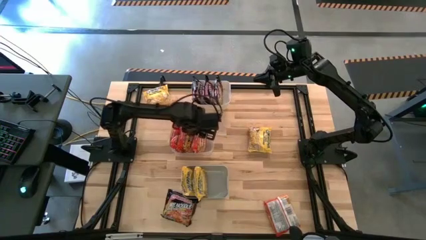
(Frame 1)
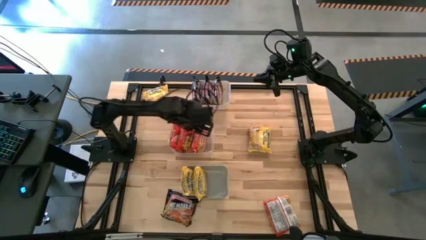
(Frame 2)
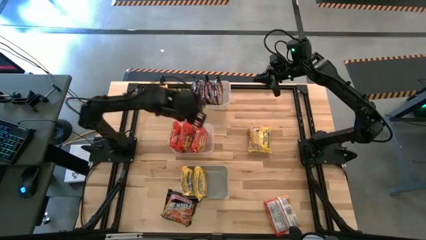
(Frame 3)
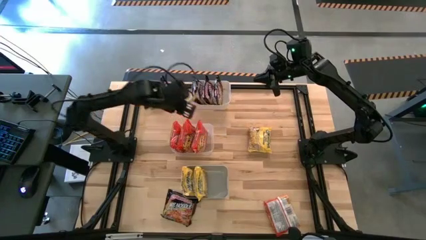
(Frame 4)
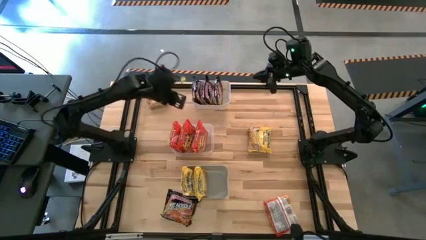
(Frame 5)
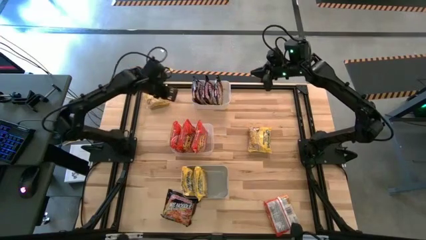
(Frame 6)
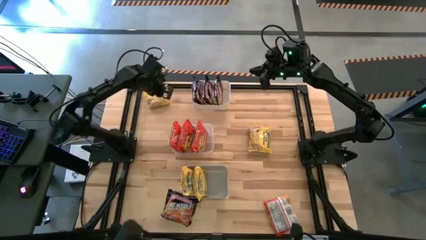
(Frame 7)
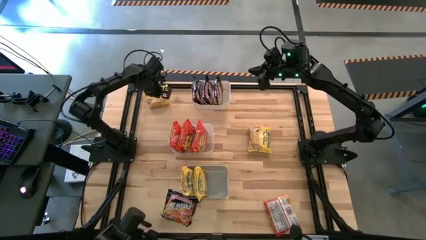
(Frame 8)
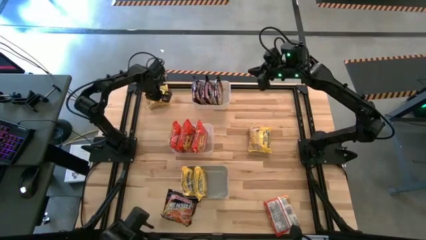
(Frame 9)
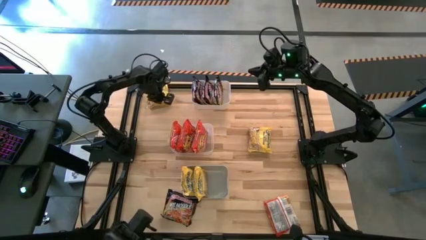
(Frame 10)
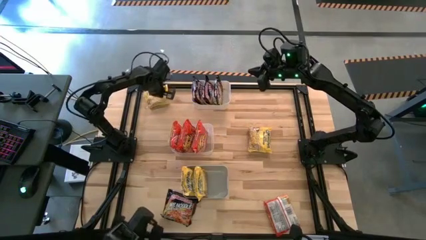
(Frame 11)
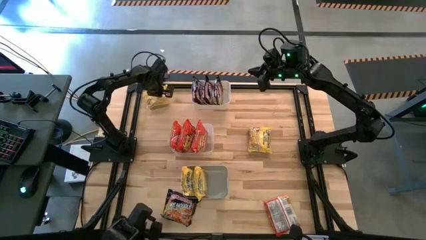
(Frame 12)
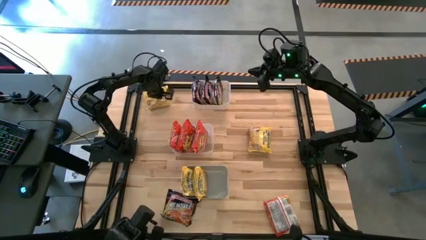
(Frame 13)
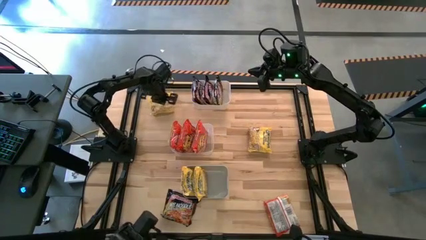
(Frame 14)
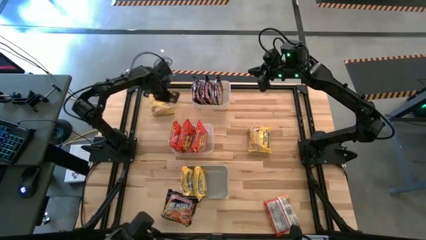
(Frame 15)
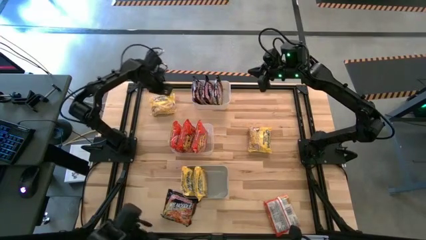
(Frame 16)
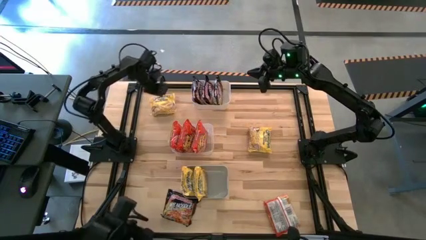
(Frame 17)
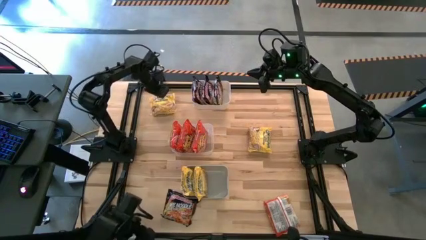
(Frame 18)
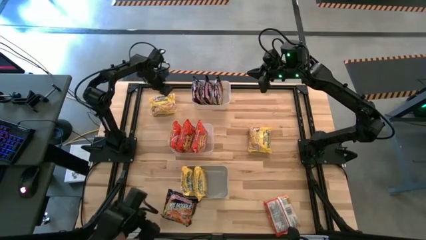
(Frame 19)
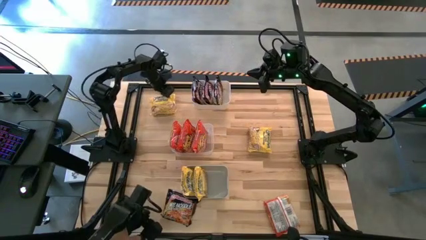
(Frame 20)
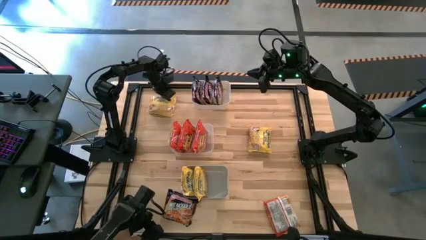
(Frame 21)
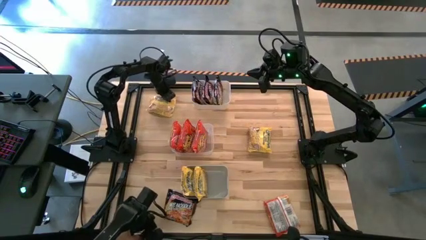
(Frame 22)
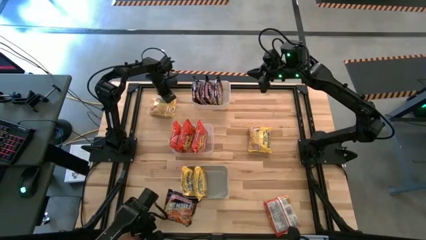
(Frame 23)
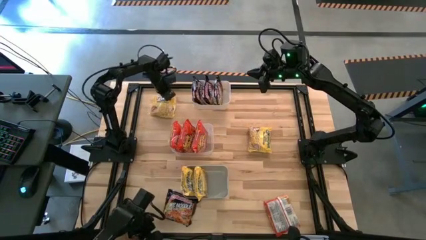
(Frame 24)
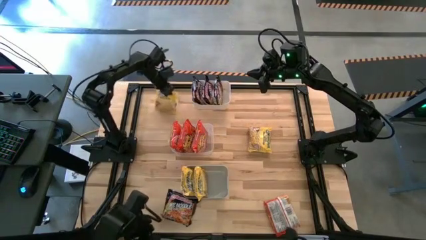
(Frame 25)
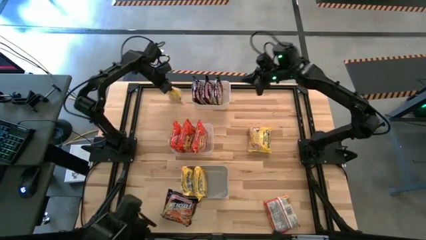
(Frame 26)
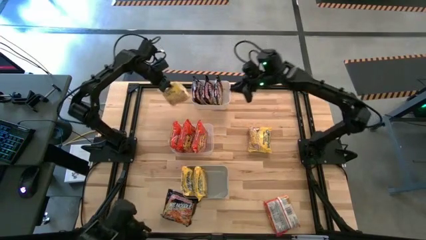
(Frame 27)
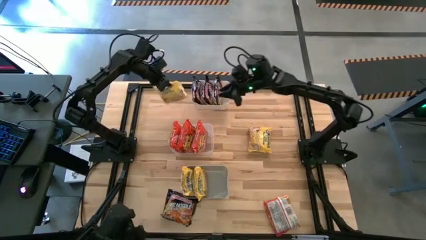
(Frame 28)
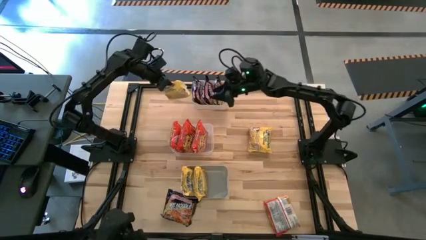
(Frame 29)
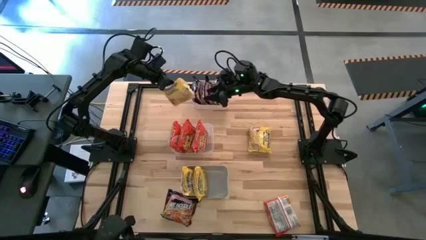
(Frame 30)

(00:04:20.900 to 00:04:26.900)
Task: Sort Maruchan noodles
Put the yellow noodle pack into the gray bin

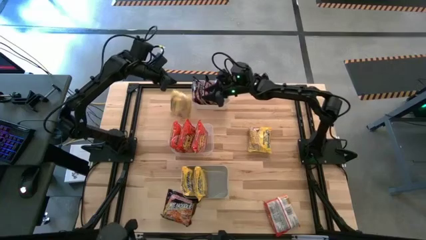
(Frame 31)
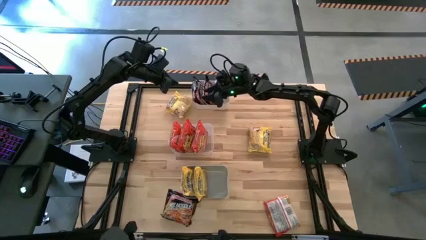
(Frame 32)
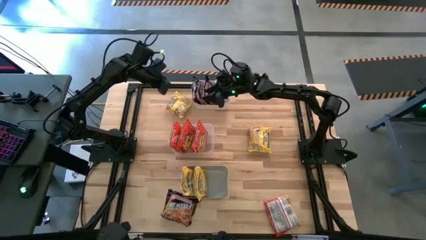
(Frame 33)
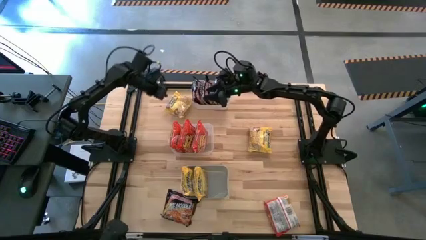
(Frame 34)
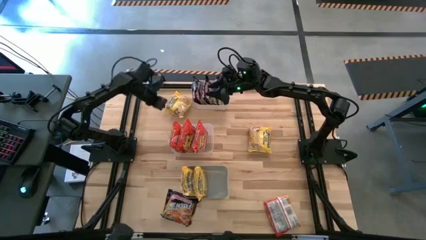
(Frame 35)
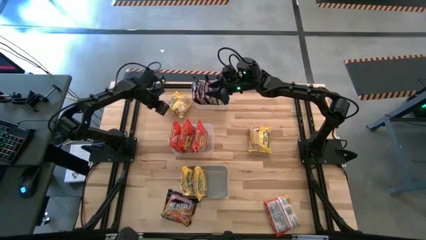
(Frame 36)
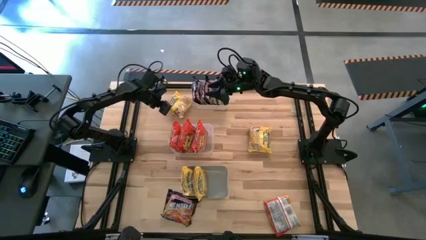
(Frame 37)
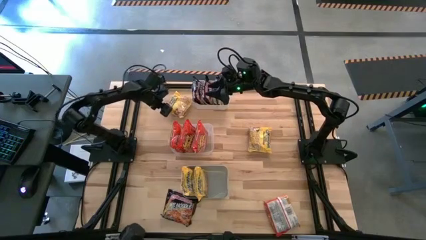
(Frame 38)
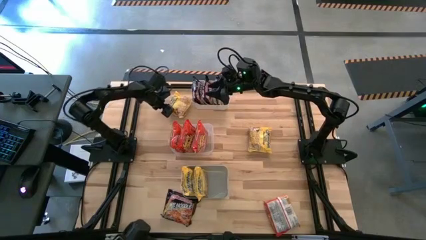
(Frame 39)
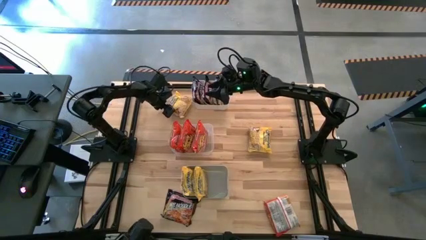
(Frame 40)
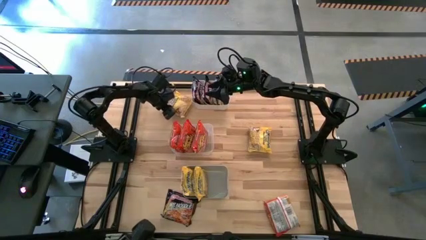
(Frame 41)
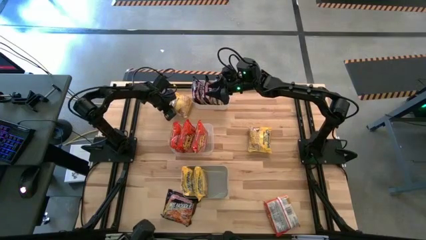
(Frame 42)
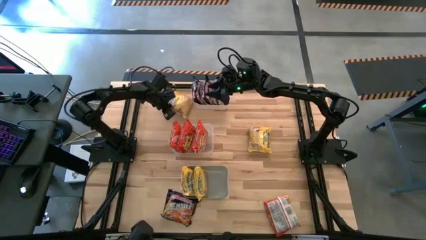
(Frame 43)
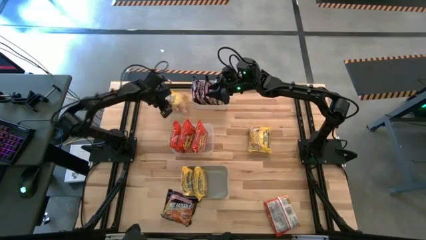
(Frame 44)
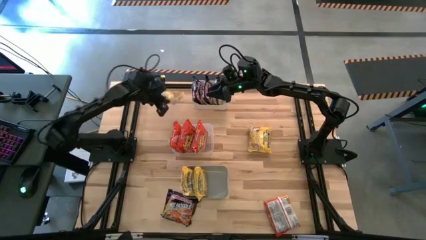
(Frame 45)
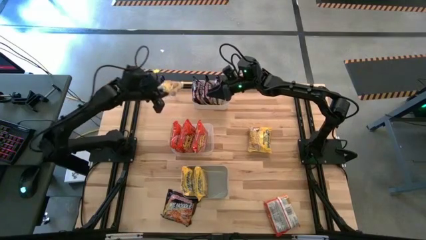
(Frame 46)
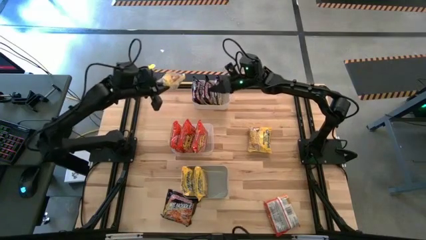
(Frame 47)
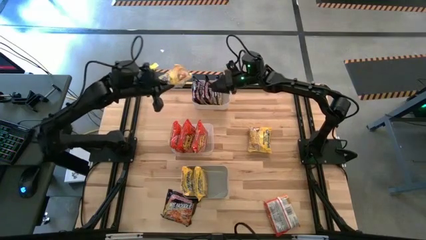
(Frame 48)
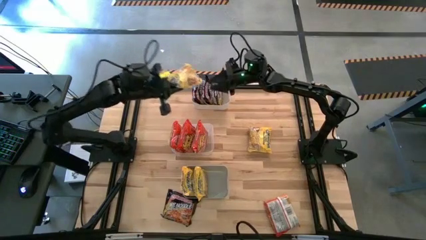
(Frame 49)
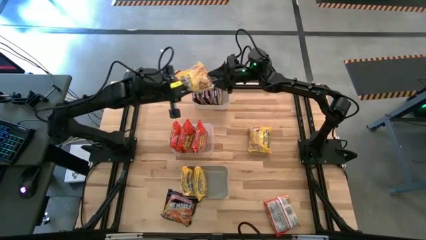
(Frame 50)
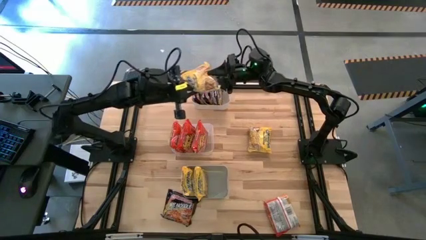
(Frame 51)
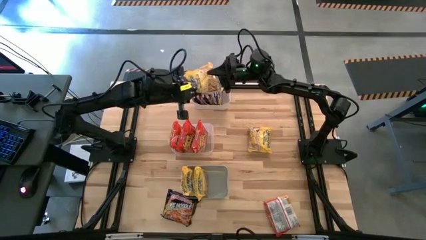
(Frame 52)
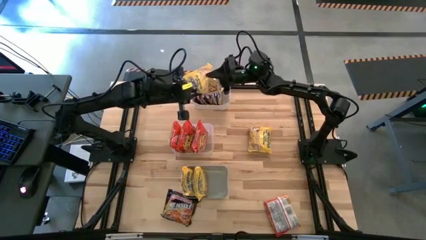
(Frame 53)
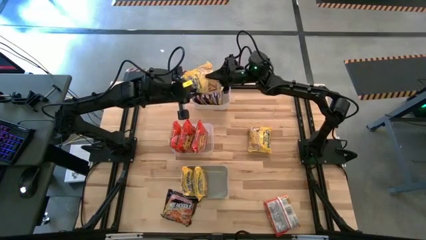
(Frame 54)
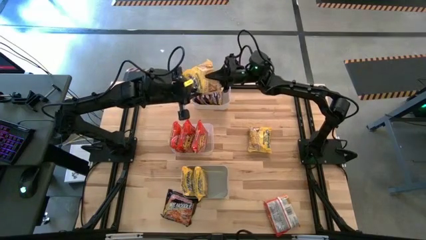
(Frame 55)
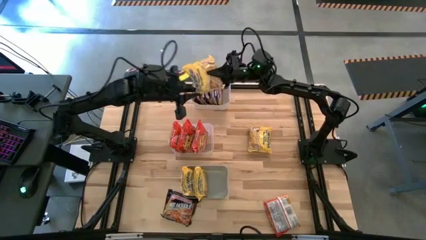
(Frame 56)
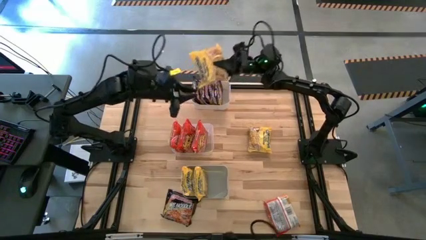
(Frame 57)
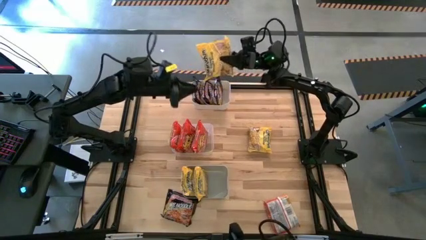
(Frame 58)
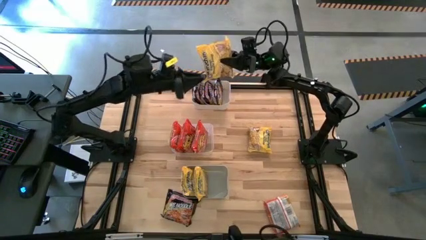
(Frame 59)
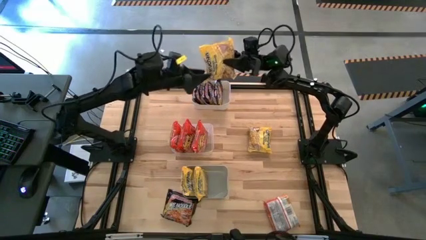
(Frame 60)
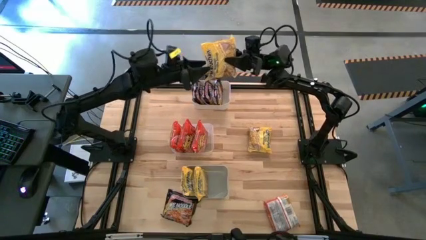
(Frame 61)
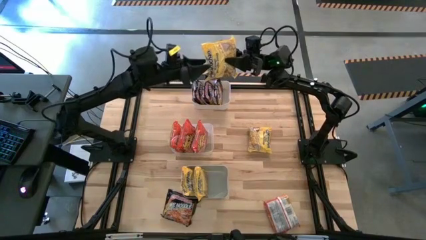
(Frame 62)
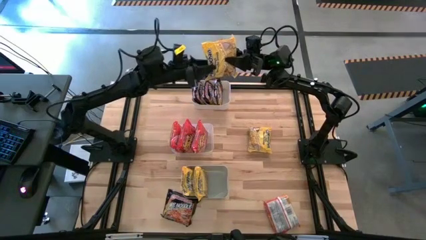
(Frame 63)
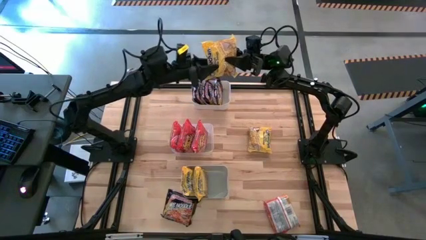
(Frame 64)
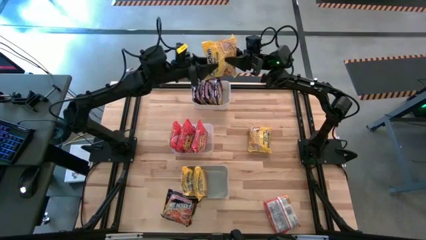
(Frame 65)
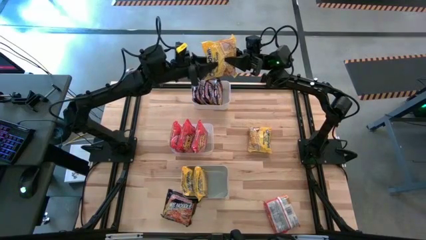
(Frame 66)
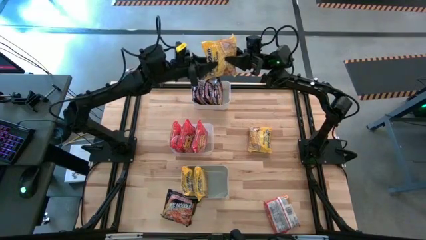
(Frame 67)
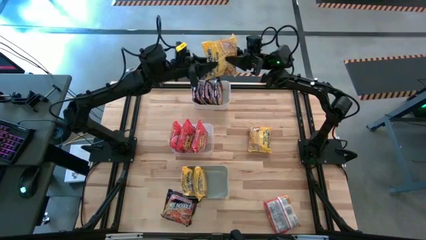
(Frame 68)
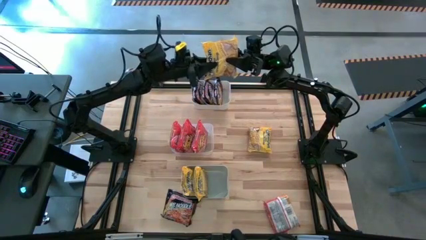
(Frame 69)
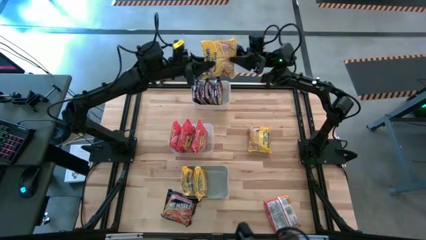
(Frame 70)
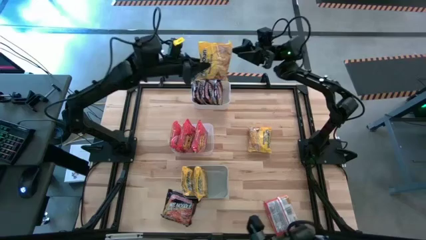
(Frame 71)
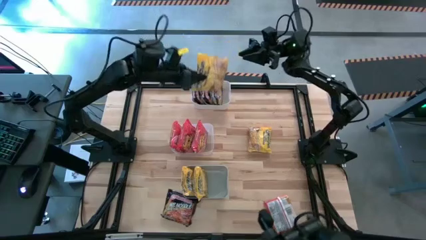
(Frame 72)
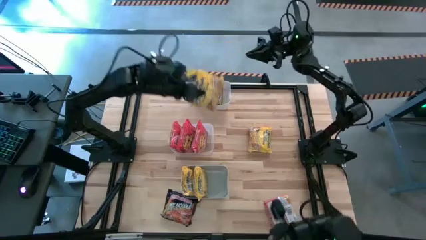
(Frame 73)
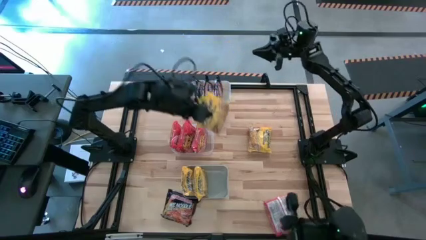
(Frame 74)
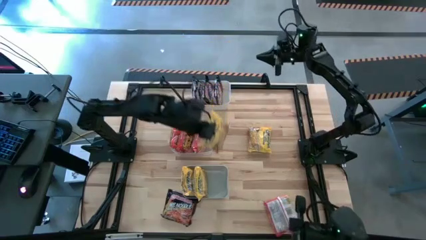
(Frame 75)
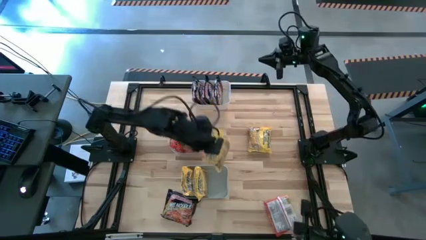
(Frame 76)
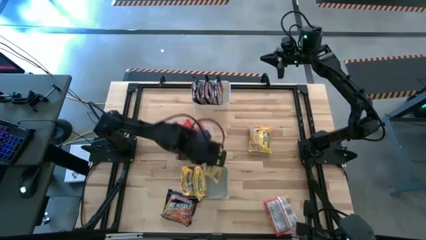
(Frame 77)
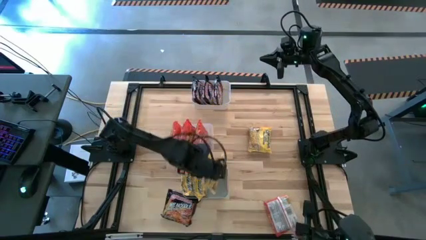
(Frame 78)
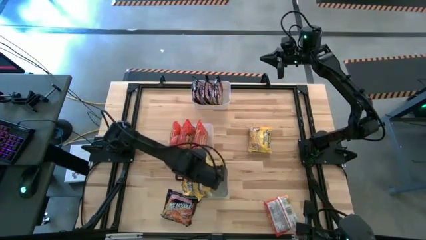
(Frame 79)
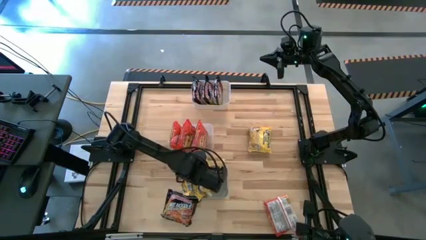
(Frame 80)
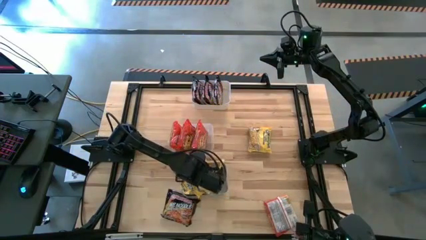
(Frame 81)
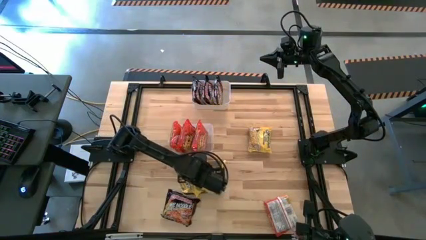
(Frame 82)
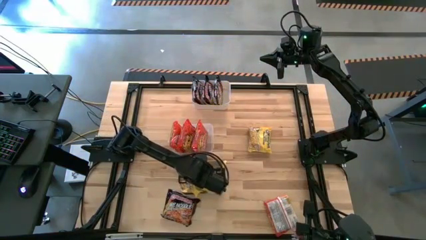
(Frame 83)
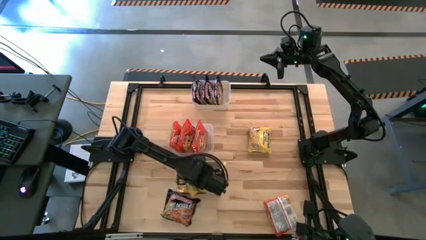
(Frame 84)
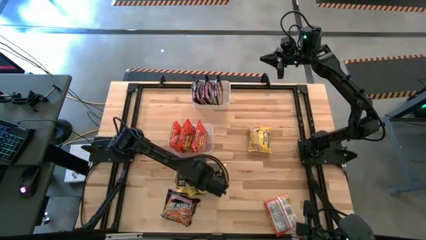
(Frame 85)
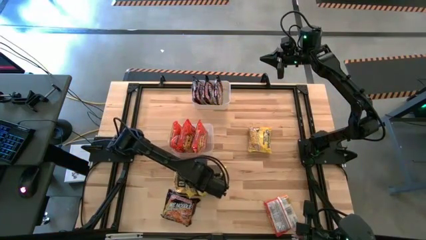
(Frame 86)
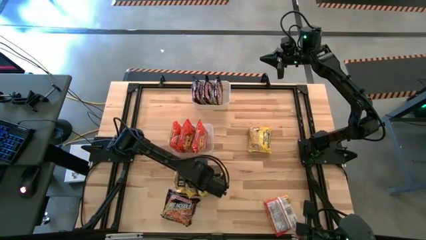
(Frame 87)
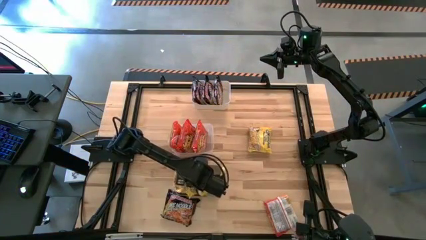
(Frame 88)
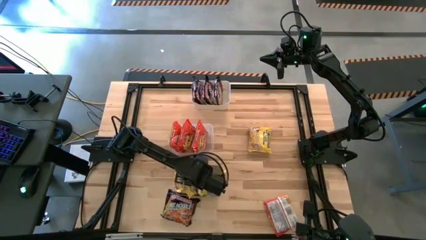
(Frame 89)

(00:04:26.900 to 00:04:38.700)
Put the yellow noodle pack into the gray bin
